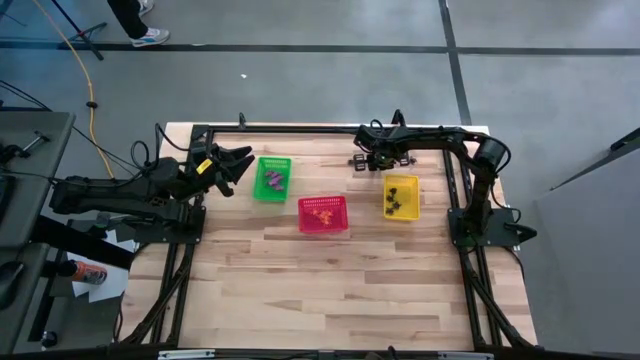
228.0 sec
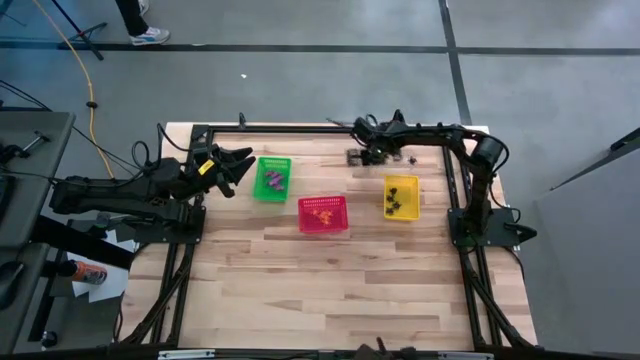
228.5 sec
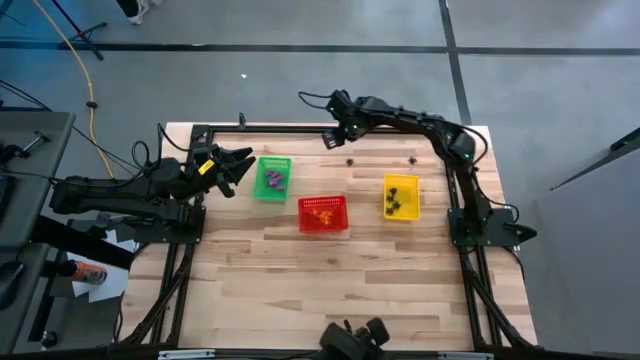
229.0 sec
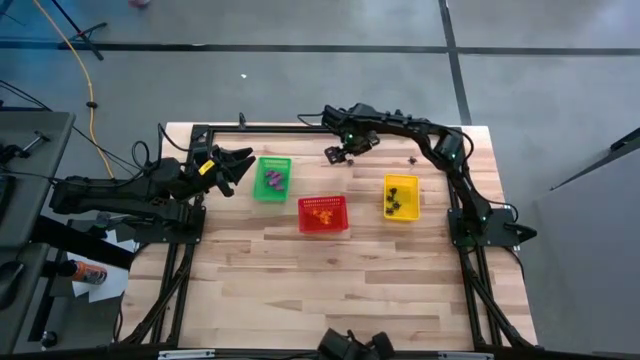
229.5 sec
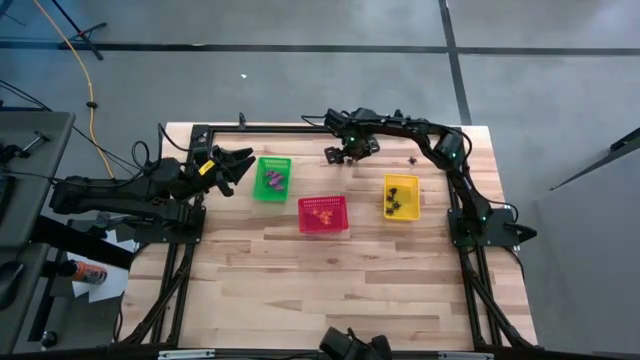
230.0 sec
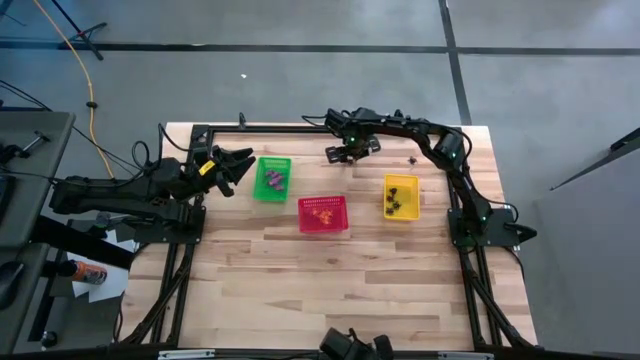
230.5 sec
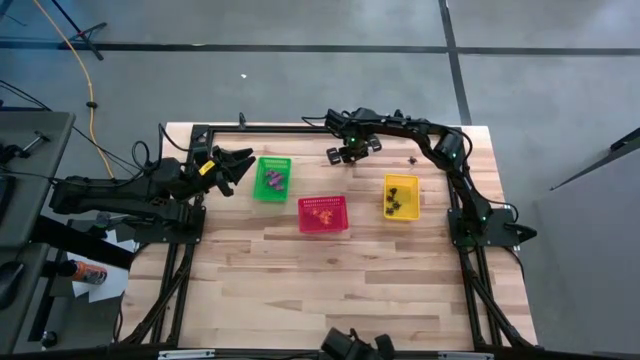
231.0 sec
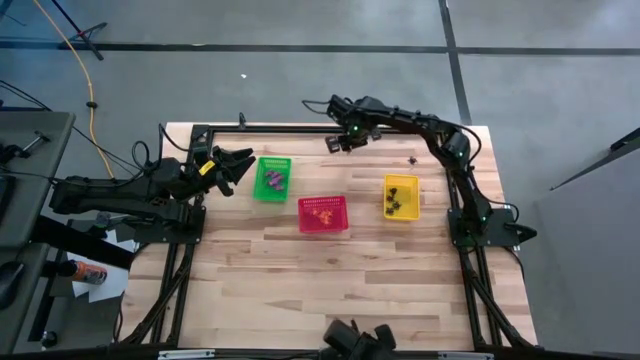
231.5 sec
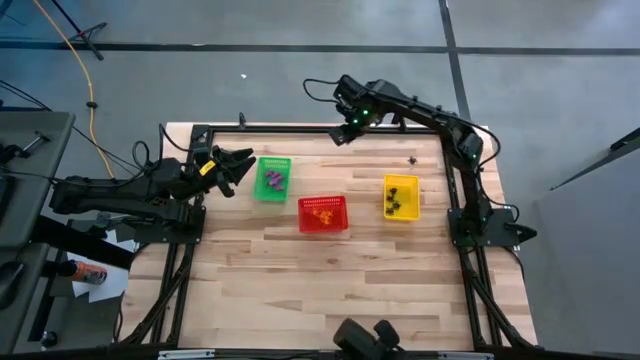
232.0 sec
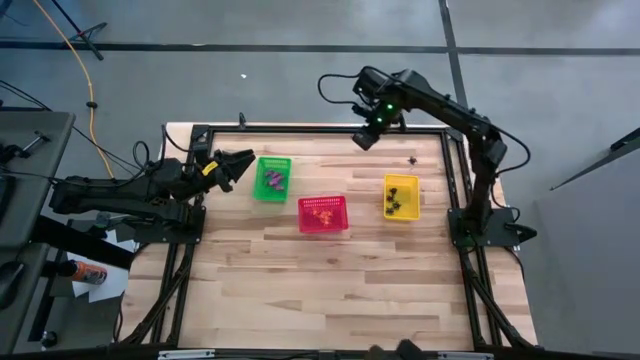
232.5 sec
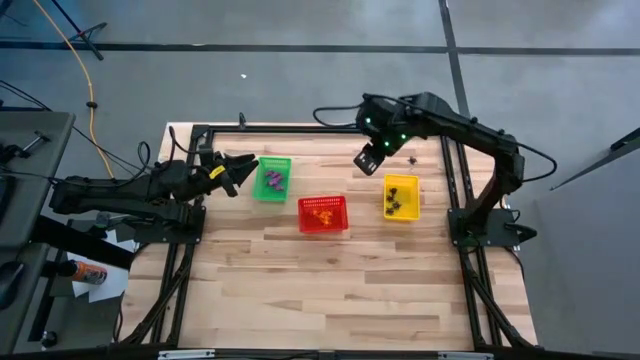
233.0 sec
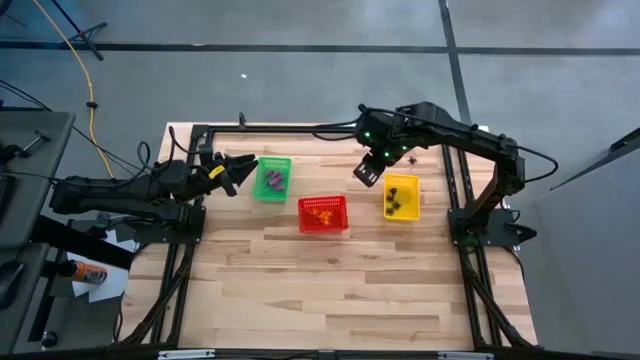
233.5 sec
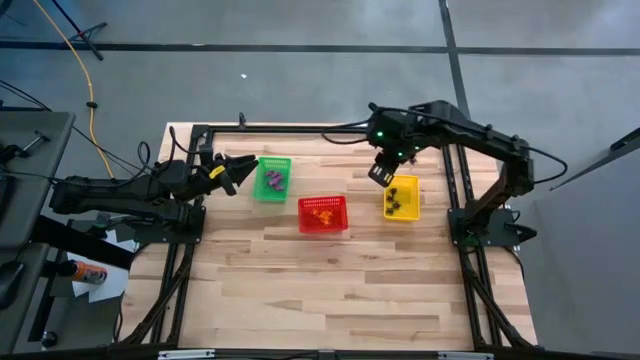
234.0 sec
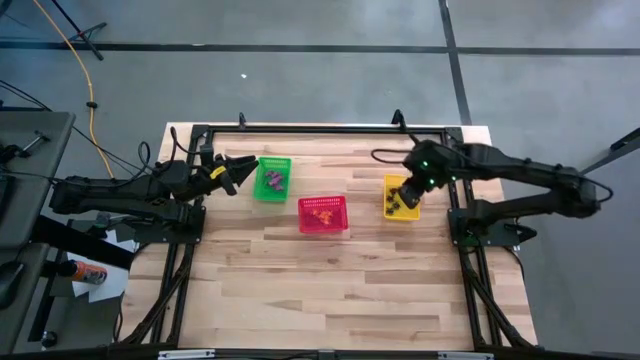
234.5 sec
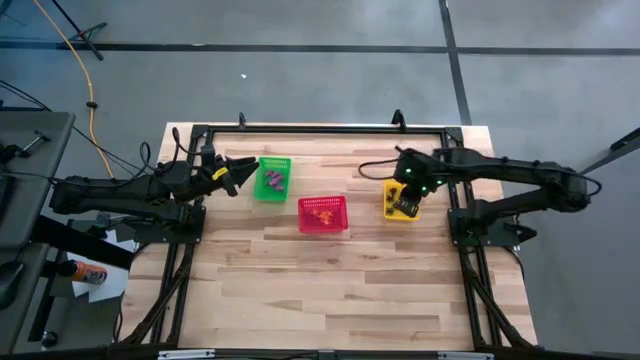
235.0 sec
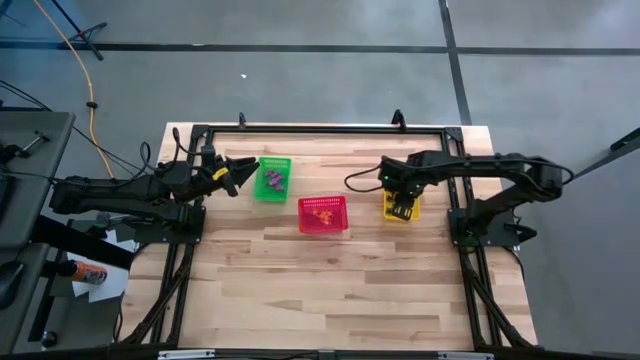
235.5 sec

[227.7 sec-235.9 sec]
Task: Sort Halloween decoration
Put the black spider toy into the yellow bin

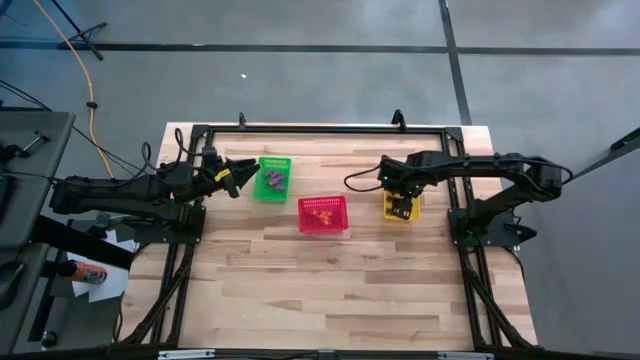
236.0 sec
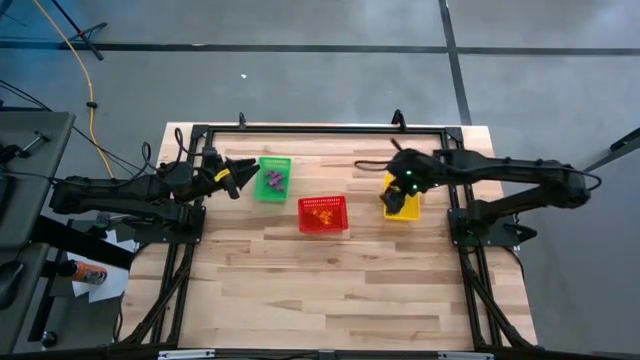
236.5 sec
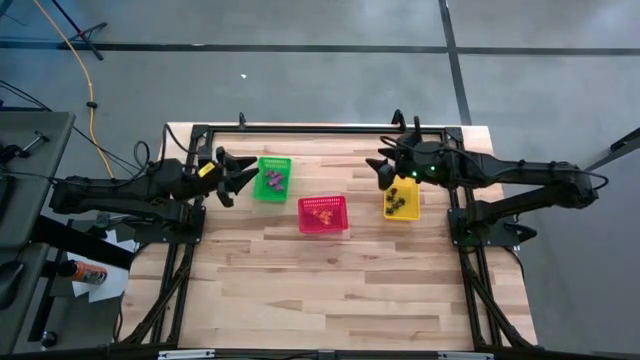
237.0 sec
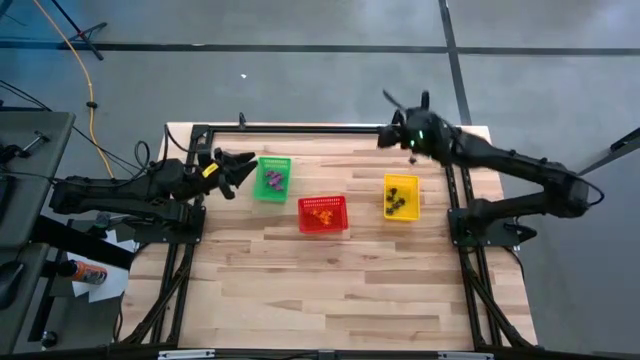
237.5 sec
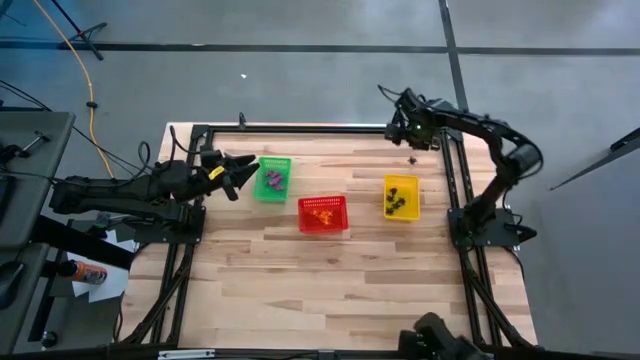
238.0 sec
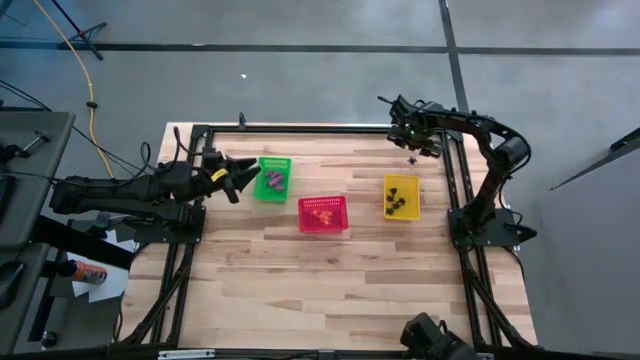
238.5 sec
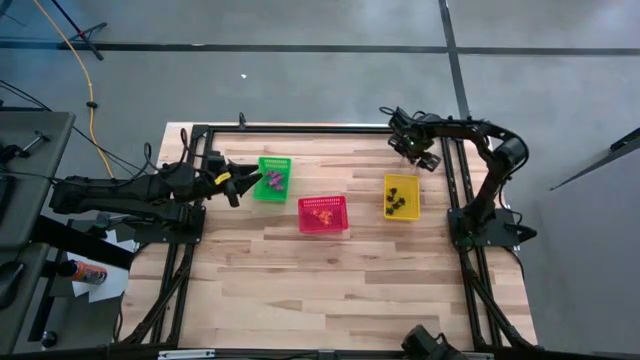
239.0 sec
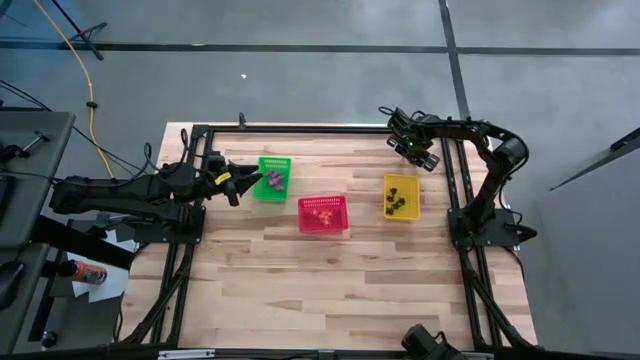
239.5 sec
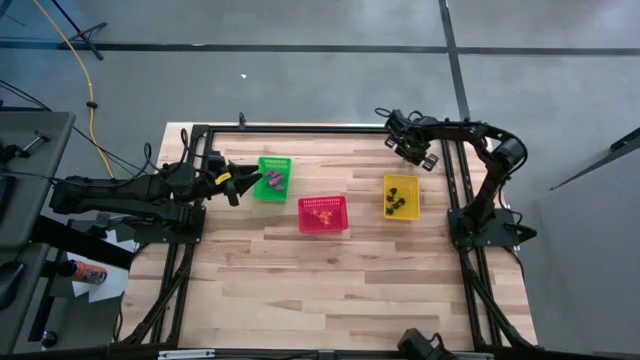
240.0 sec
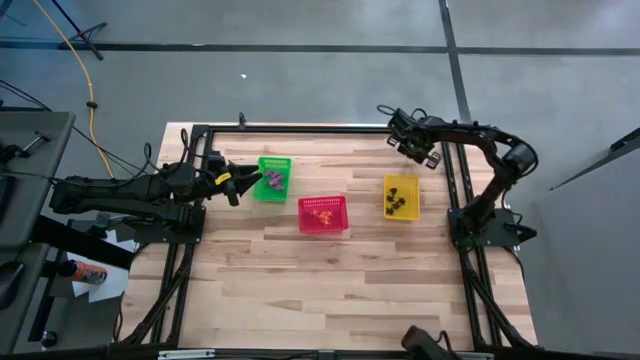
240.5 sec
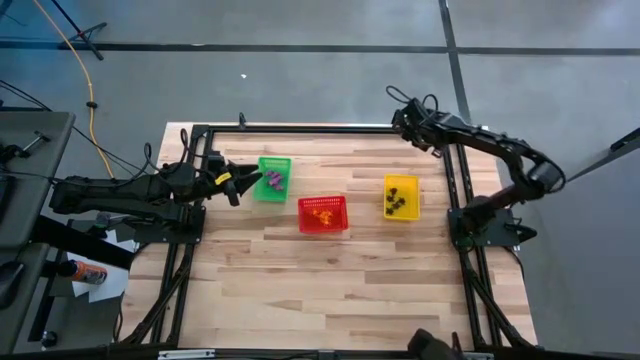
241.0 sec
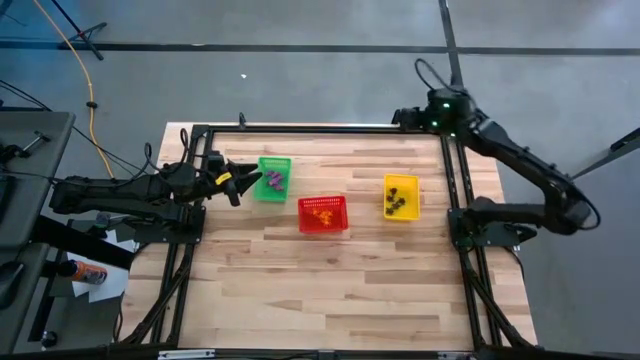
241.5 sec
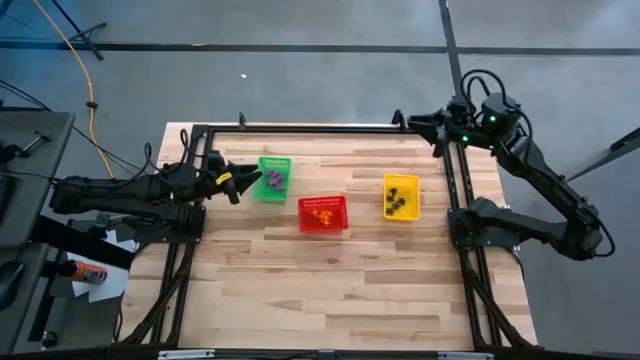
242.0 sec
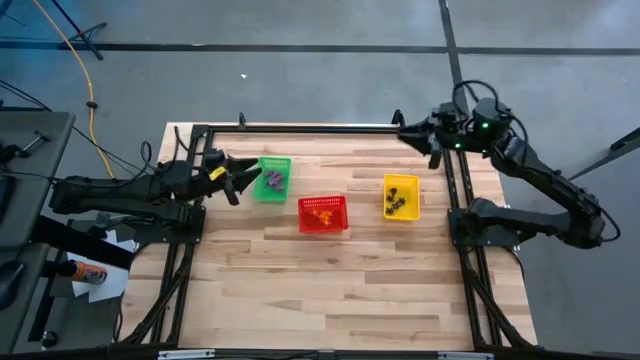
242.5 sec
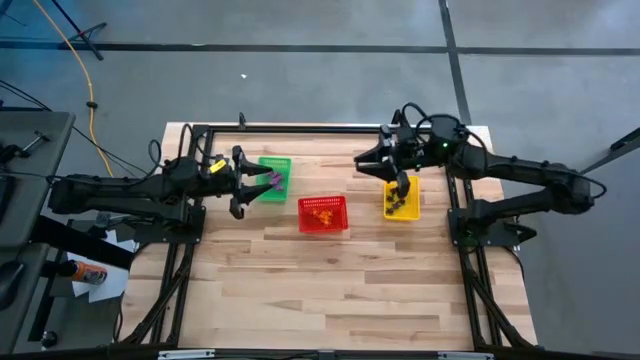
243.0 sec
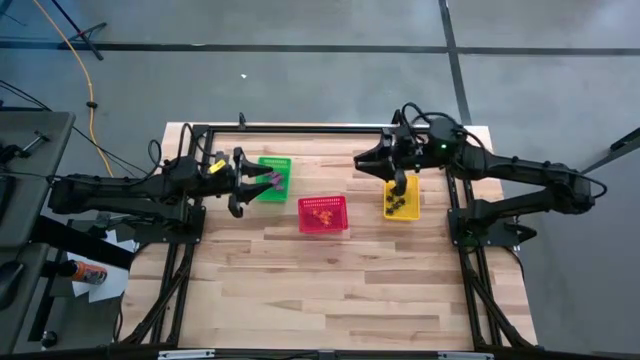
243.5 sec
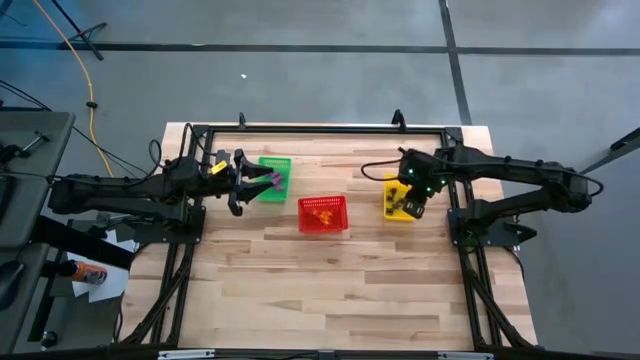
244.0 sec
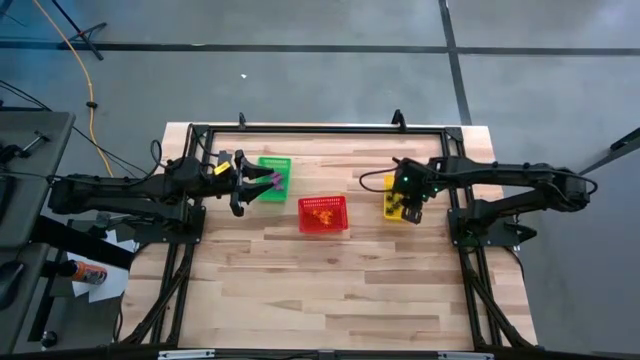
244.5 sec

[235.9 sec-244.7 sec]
Put the black spider toy into the yellow bin

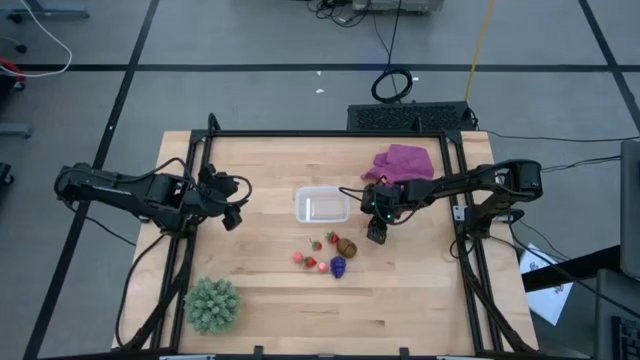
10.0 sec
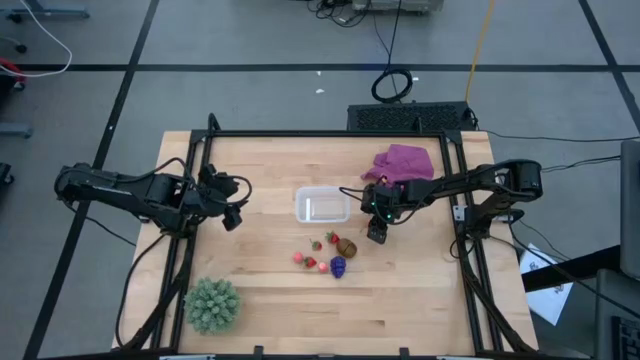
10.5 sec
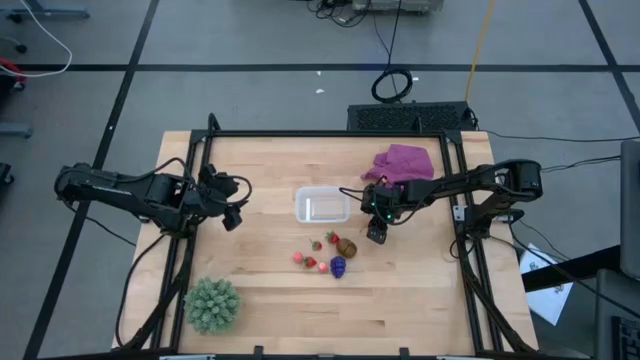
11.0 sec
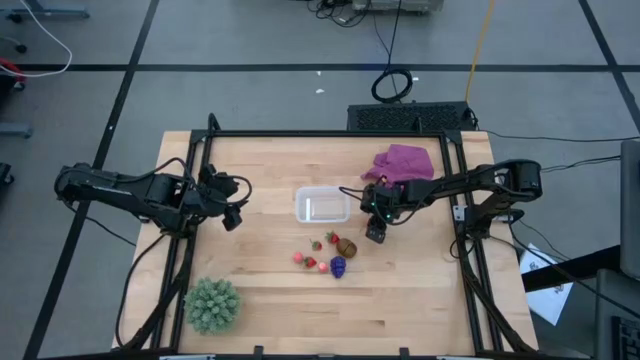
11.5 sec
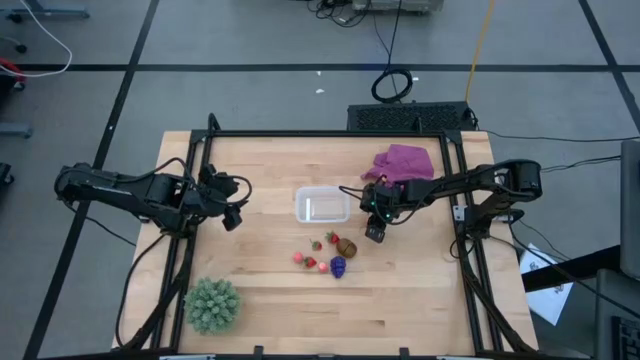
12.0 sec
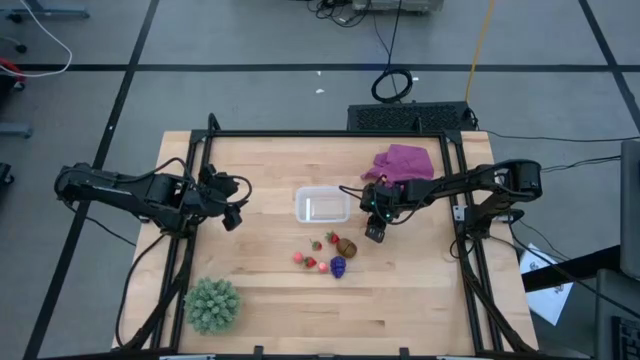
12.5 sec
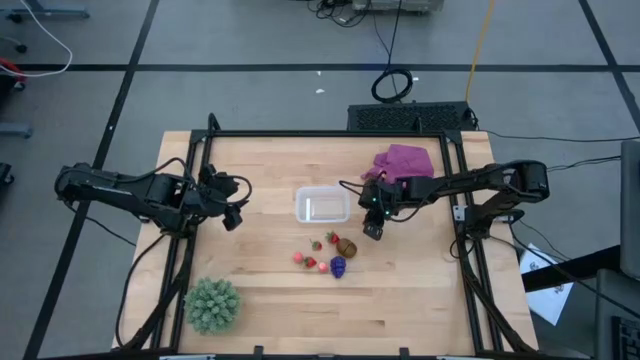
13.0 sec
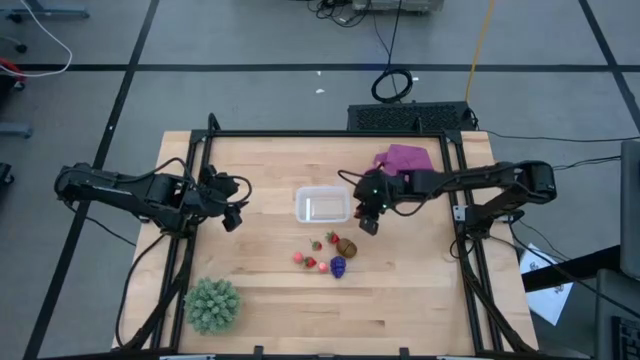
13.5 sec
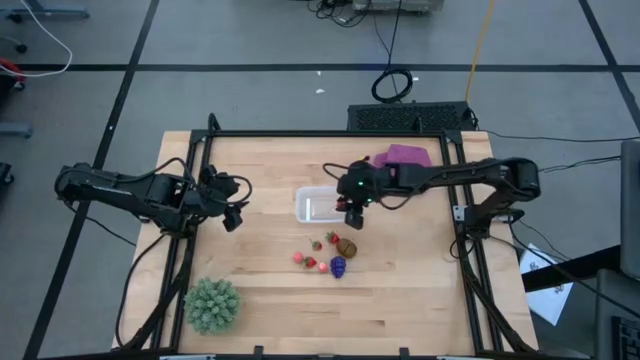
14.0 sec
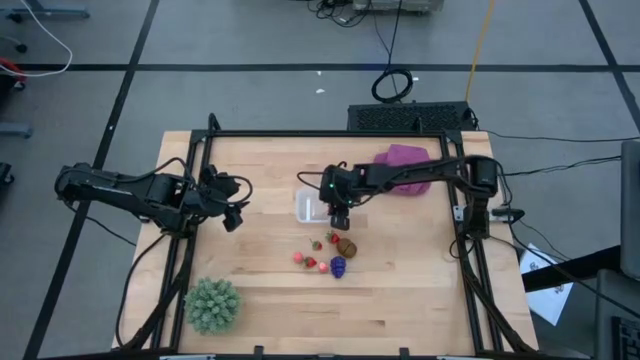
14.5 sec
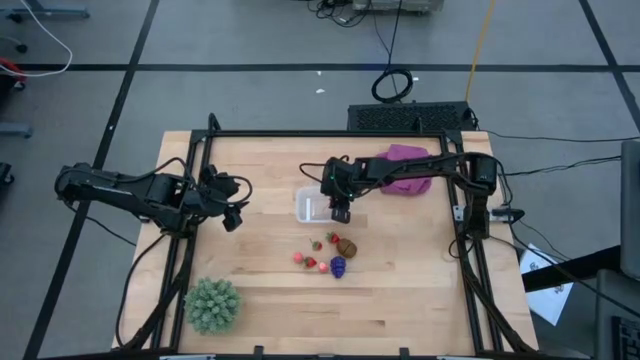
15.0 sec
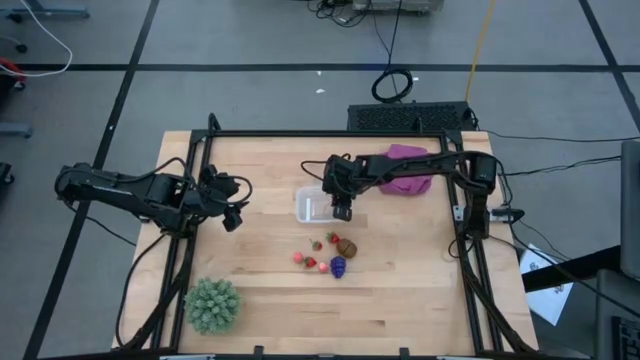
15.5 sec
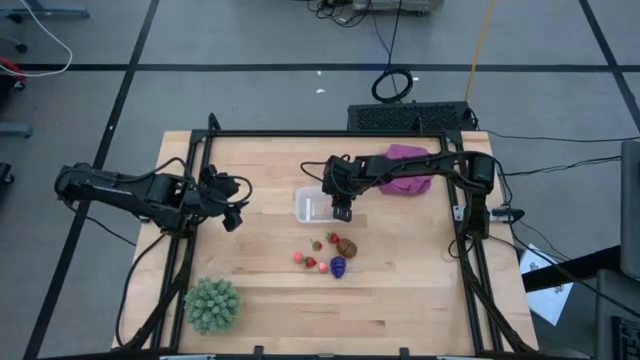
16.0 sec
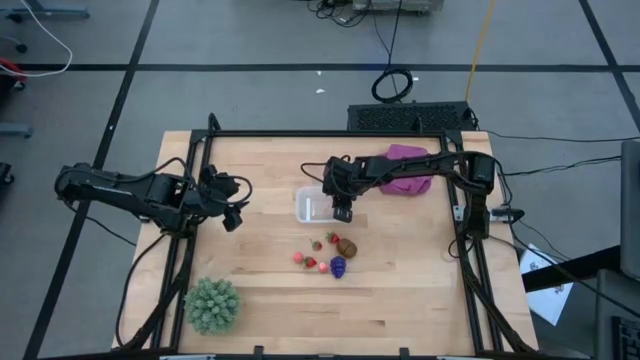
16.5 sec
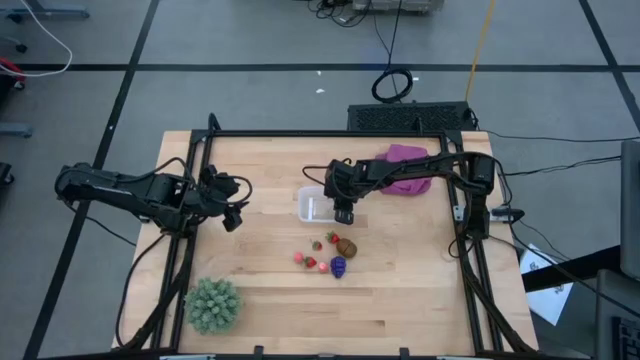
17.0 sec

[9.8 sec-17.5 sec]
Task: Pick and placing Produce into tupperware
Put the cherry into the transparent bin
